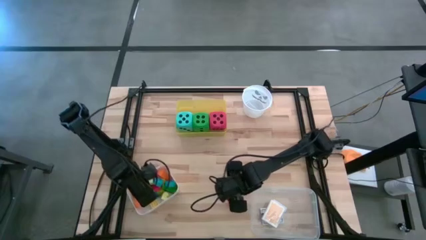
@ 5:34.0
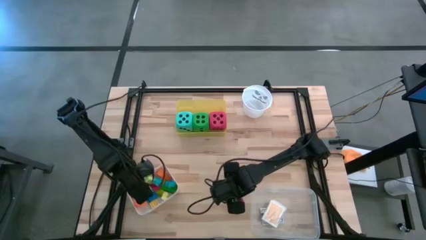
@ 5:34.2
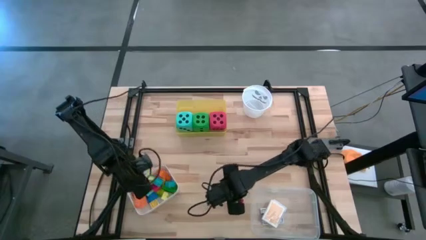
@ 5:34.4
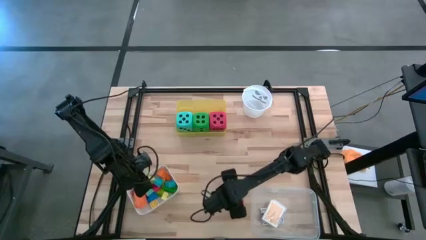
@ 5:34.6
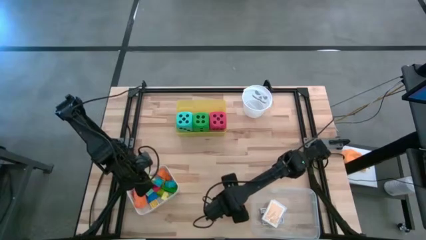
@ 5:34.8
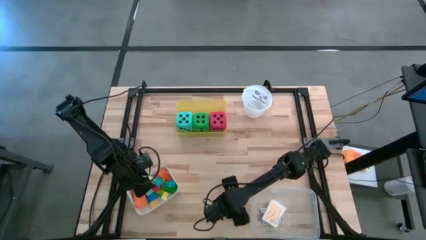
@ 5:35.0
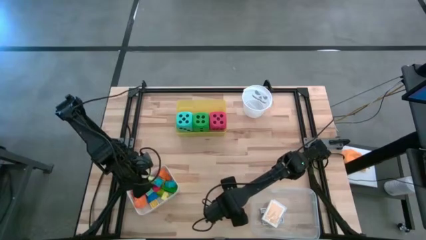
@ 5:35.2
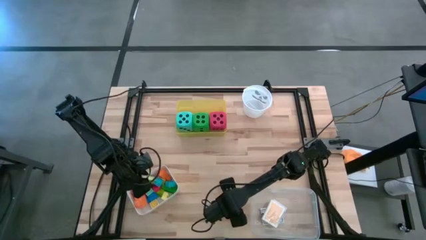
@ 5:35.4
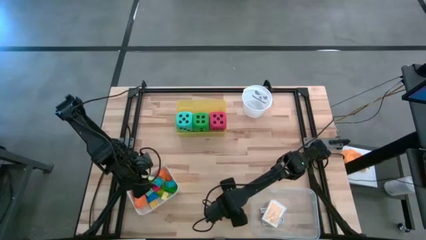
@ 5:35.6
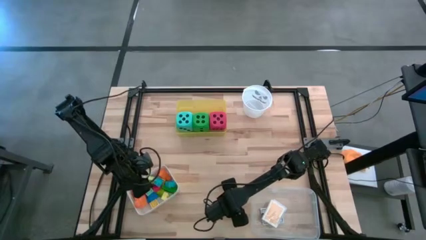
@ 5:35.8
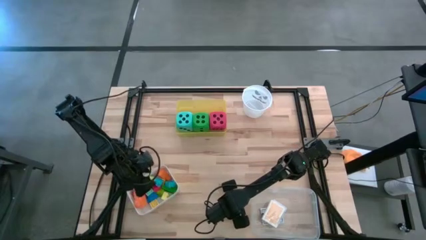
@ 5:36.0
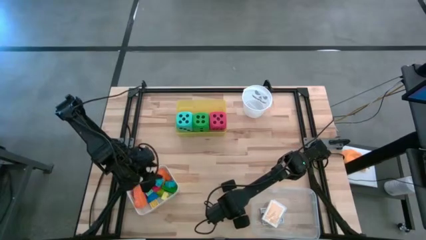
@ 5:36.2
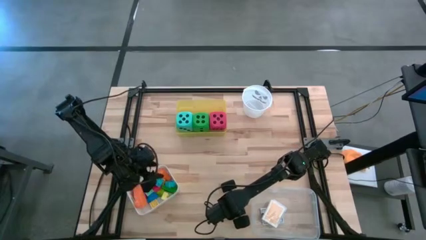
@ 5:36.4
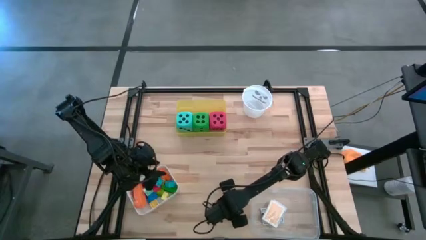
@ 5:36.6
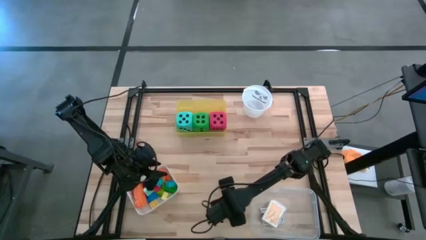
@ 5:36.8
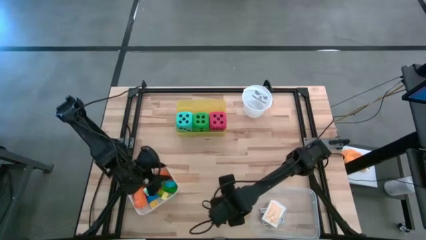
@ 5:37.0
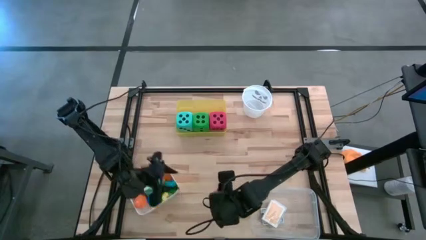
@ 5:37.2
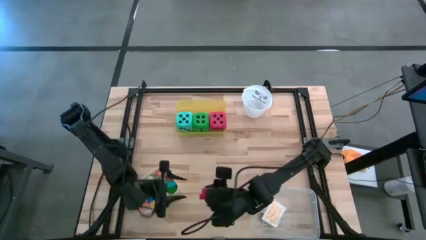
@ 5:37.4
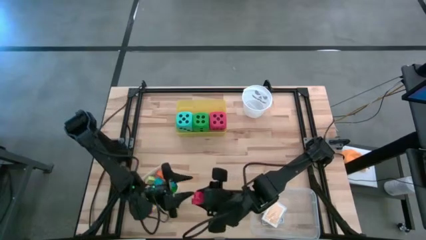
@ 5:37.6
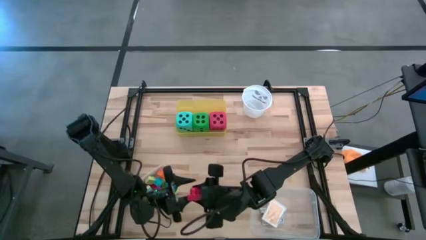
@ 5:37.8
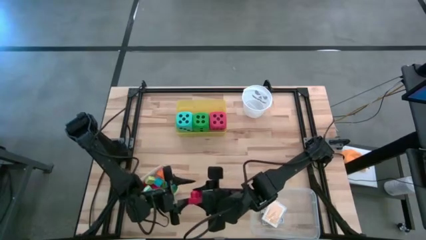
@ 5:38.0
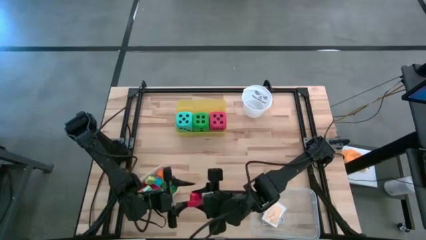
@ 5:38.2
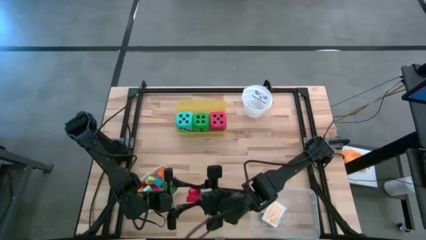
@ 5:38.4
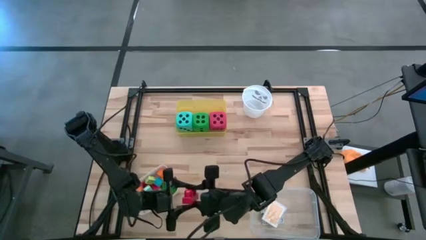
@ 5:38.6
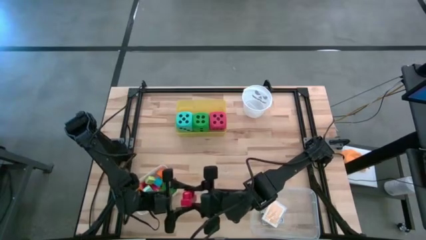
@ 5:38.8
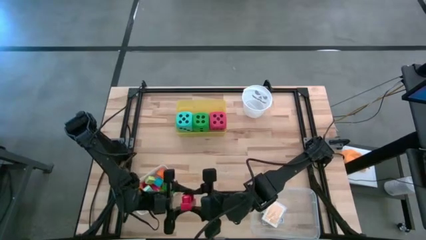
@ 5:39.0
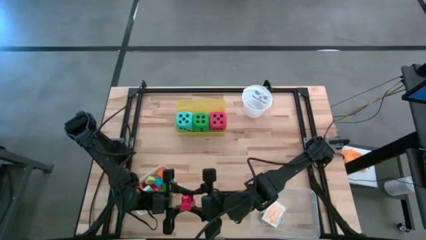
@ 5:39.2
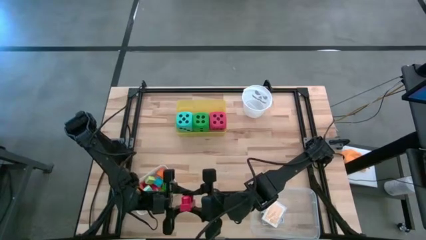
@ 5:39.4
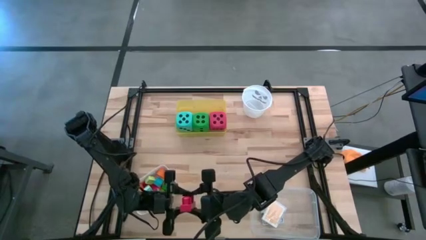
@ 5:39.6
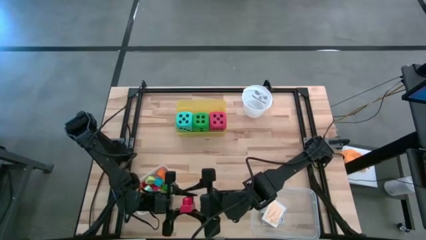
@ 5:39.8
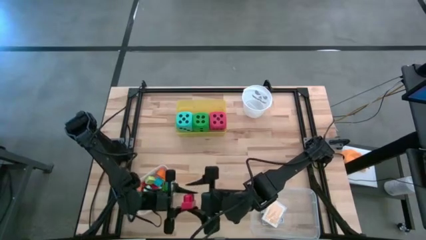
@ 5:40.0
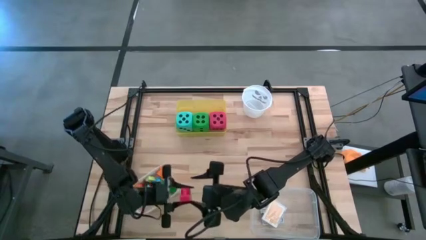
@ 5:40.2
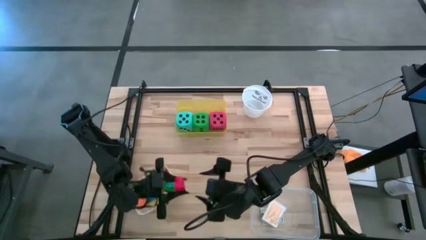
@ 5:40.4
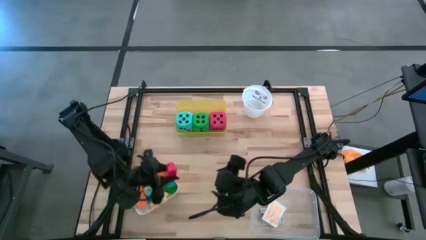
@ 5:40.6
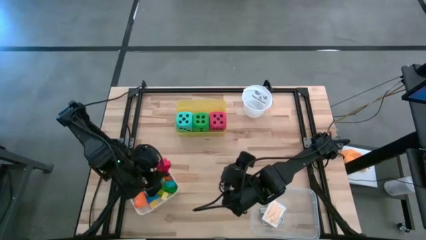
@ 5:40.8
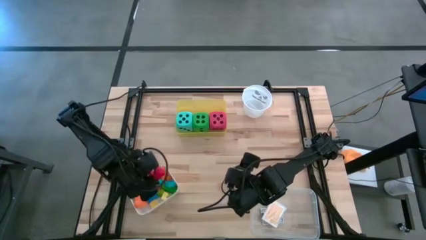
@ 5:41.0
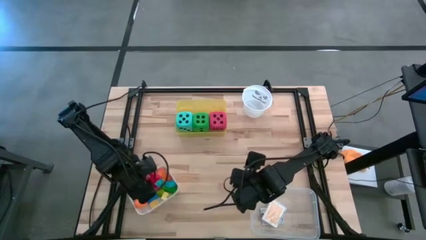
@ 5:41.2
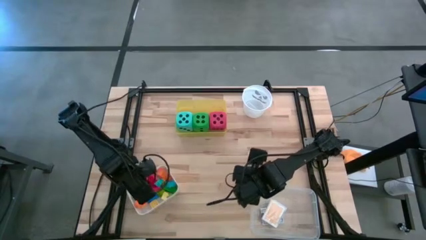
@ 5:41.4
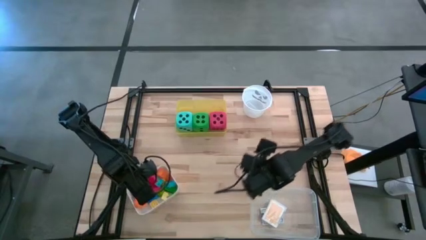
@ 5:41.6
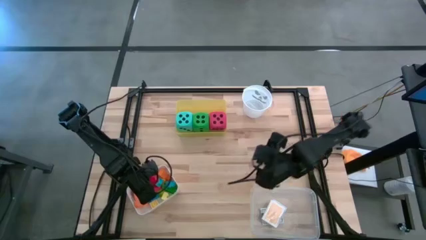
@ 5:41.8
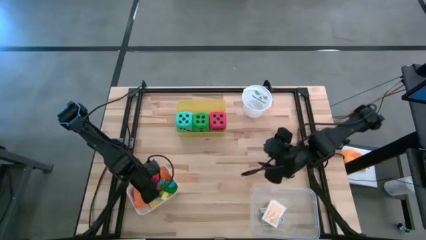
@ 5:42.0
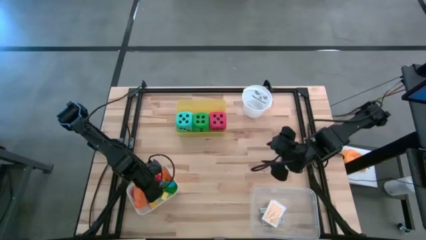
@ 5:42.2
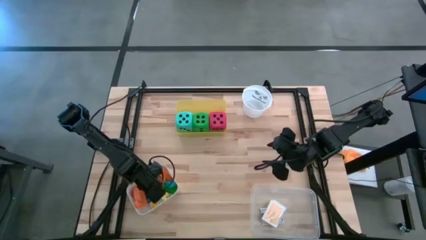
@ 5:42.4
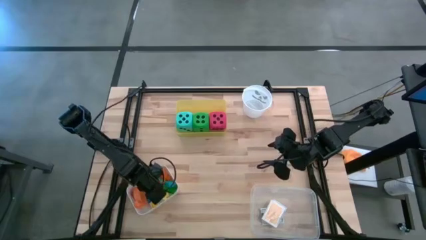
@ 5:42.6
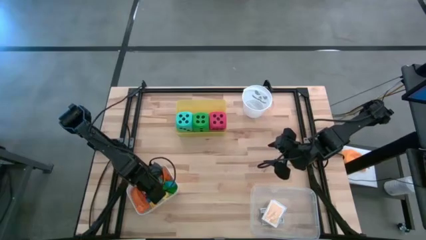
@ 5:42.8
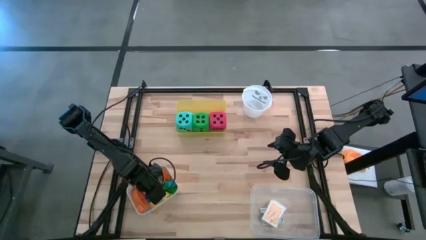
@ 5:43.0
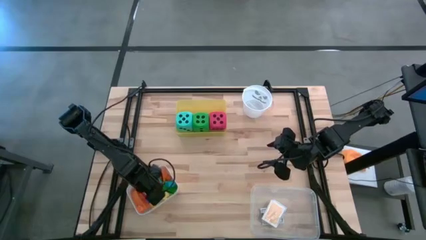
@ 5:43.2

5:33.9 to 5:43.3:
Task: Pick & Place Toys
Put the red game piece into the white bin

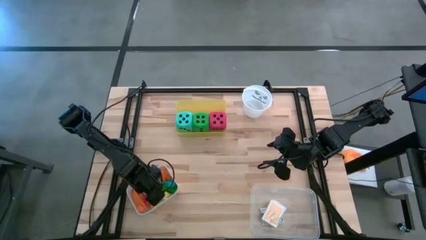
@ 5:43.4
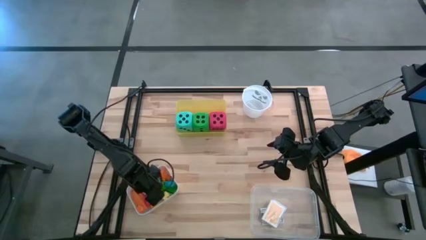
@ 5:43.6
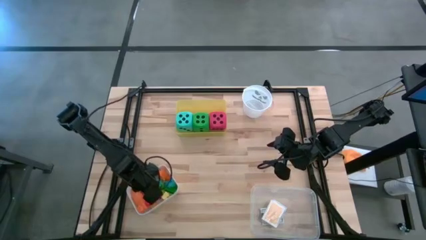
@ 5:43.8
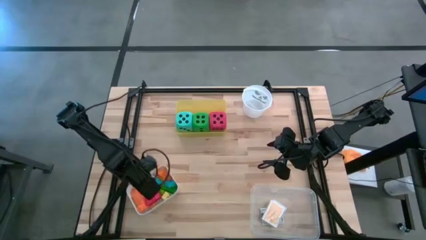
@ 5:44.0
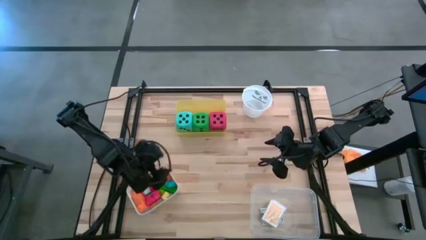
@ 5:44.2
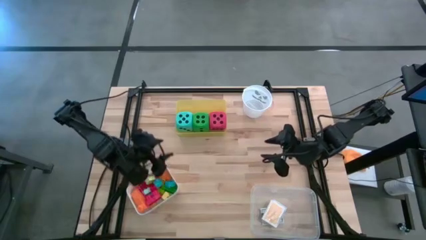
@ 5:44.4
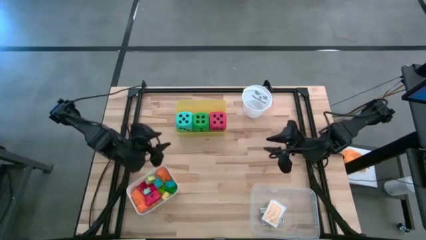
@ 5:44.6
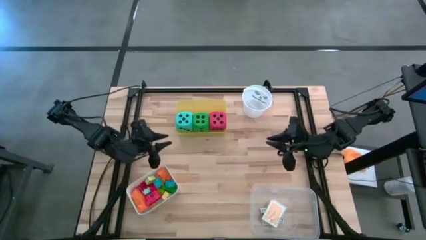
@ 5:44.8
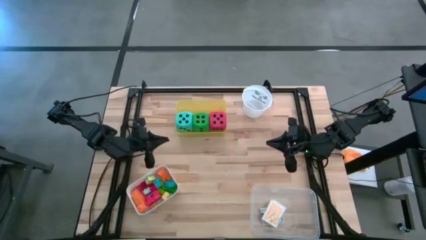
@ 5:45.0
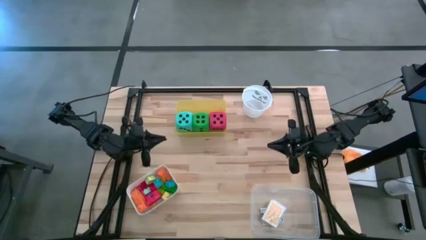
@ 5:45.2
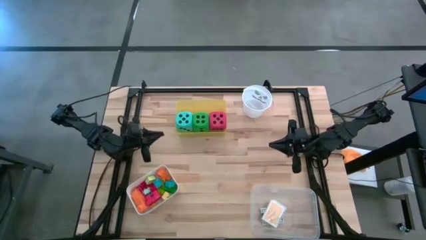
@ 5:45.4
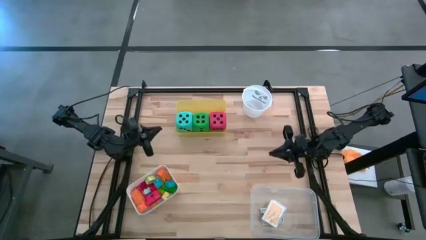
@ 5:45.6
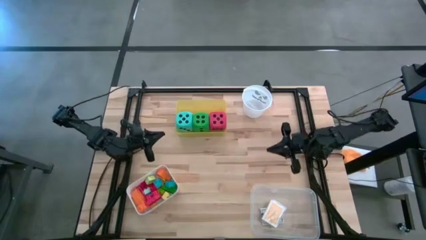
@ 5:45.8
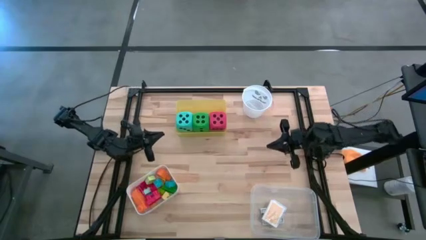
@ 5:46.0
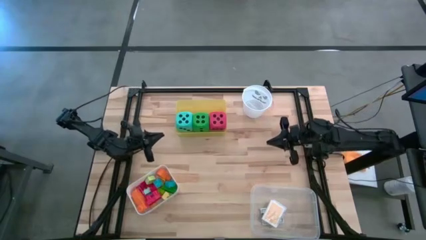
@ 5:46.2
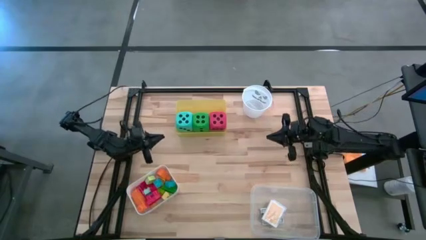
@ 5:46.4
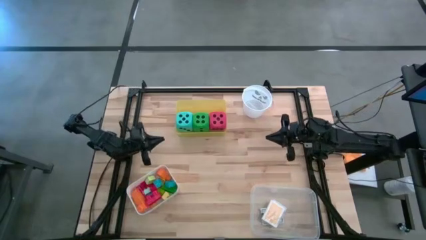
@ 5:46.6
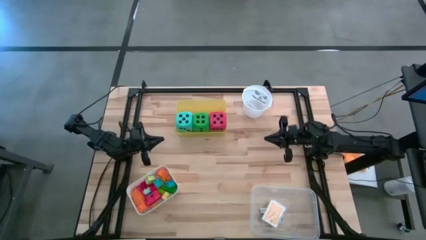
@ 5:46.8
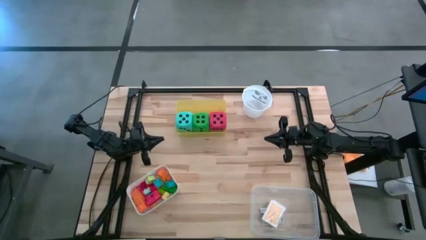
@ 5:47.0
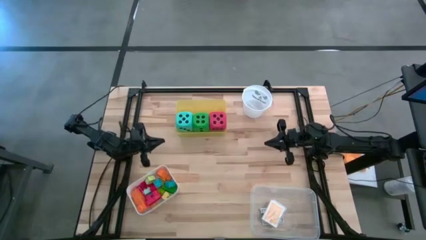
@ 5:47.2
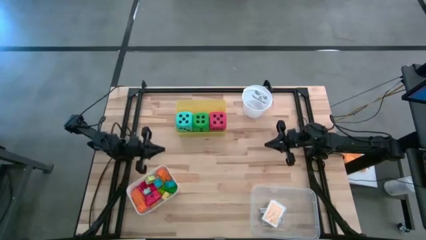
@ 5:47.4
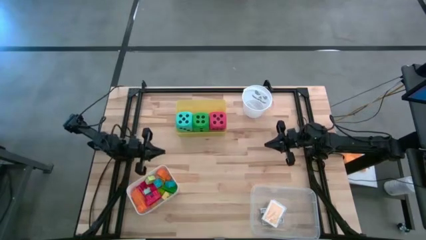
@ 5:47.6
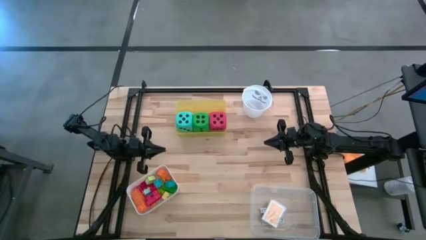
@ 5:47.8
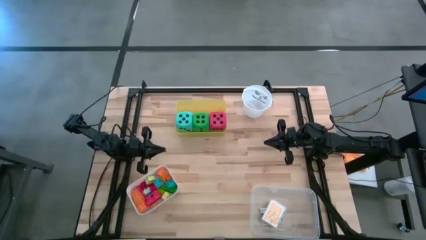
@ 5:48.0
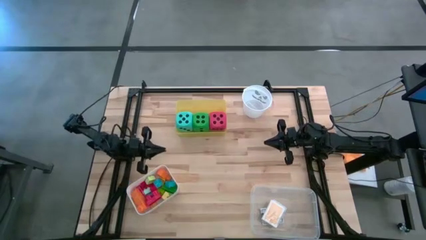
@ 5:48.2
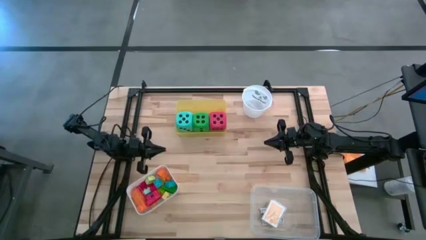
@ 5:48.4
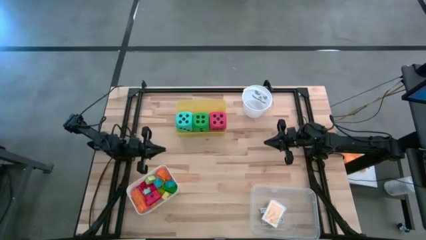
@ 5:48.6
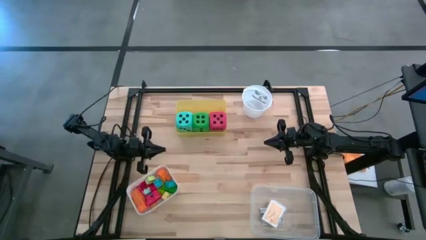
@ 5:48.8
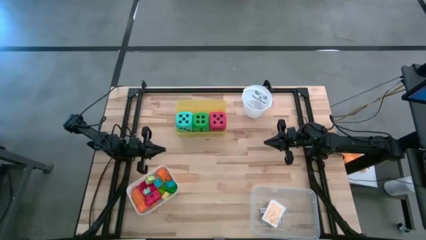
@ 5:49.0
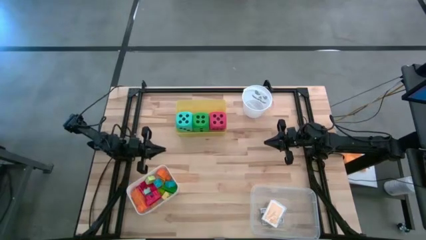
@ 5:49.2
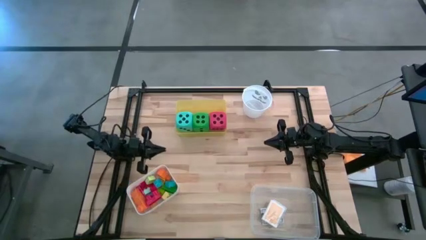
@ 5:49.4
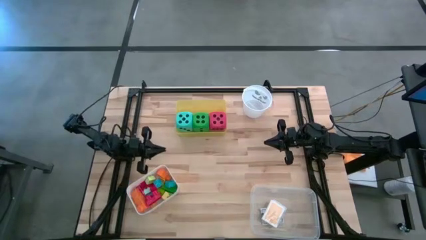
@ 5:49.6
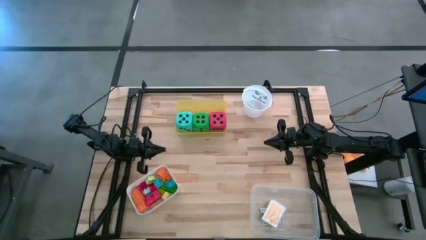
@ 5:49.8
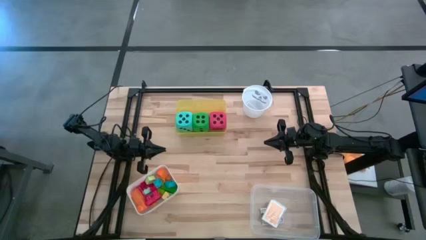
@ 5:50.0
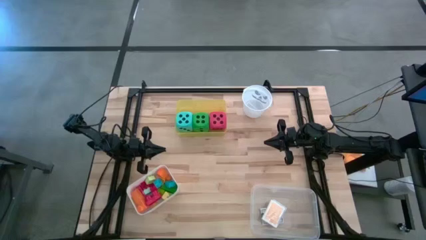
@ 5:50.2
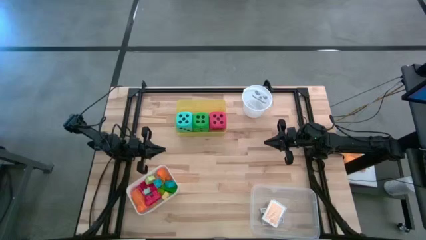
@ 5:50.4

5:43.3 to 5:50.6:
Return to Home Position
